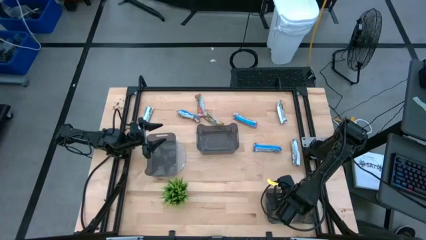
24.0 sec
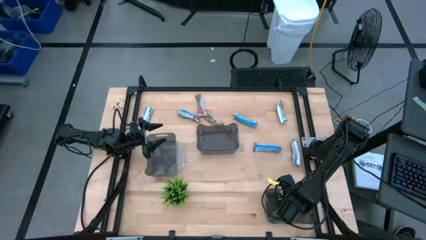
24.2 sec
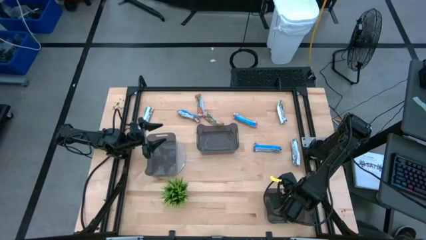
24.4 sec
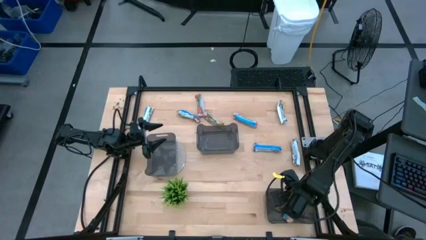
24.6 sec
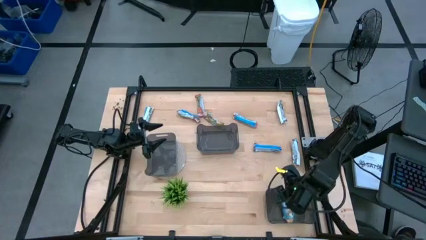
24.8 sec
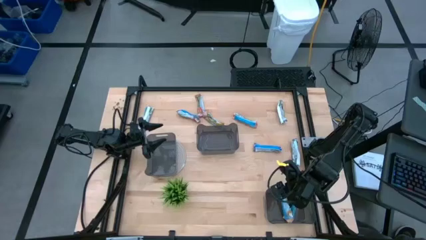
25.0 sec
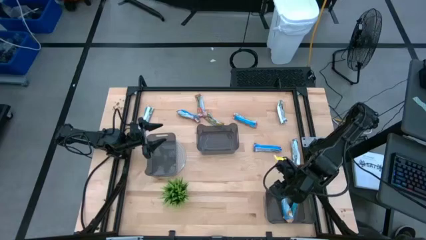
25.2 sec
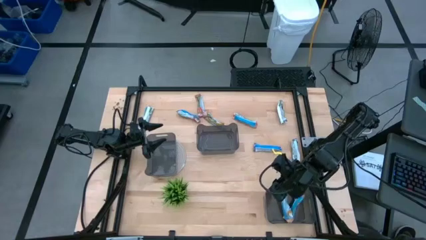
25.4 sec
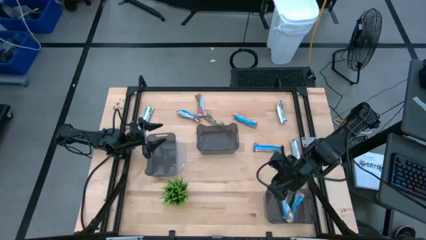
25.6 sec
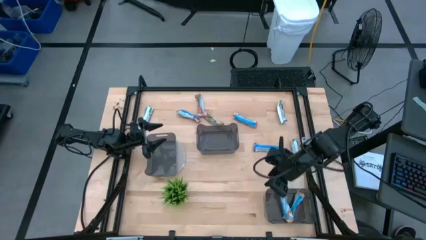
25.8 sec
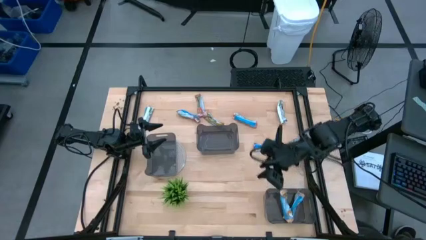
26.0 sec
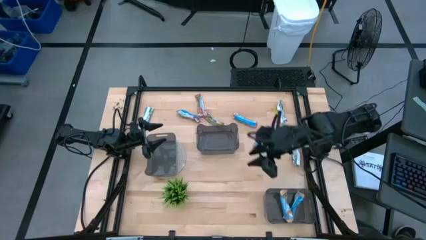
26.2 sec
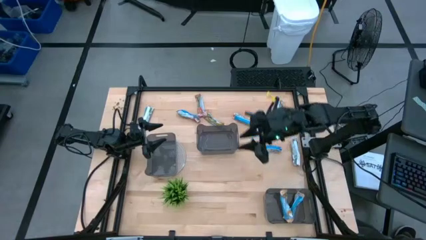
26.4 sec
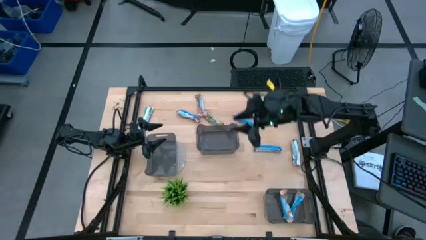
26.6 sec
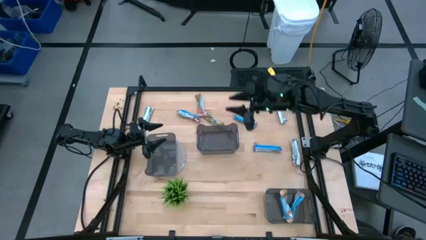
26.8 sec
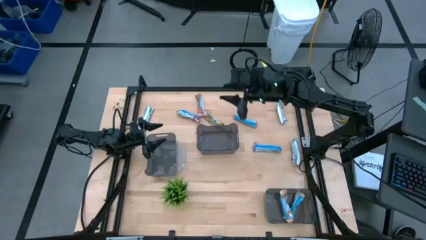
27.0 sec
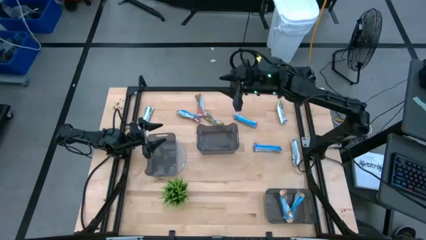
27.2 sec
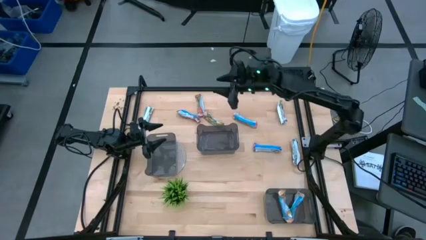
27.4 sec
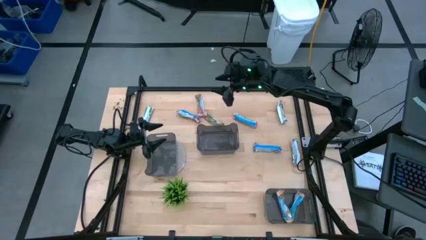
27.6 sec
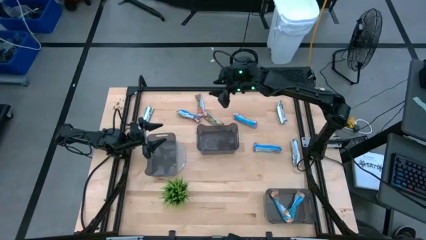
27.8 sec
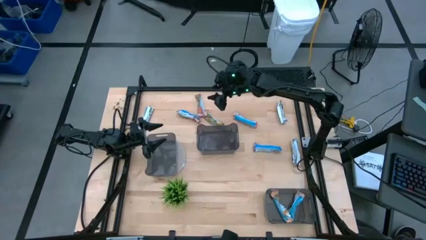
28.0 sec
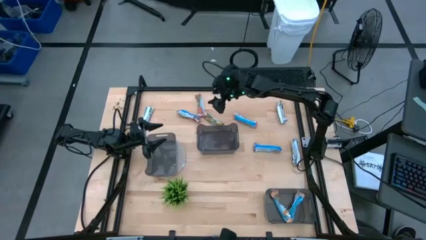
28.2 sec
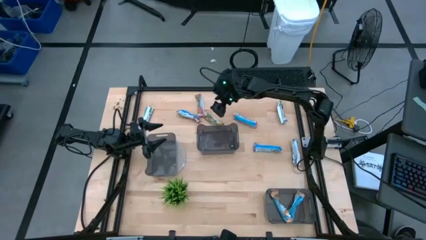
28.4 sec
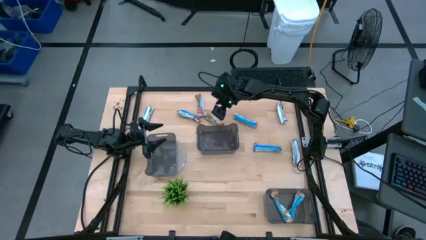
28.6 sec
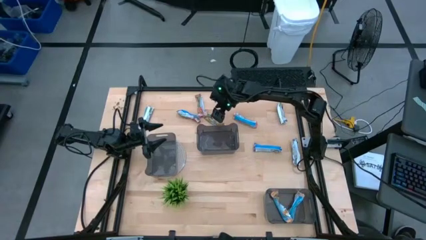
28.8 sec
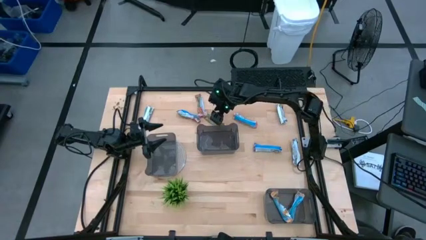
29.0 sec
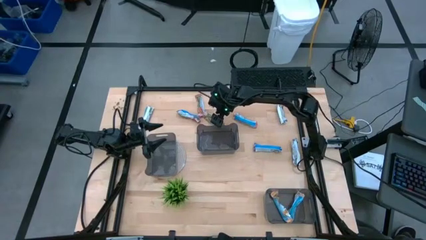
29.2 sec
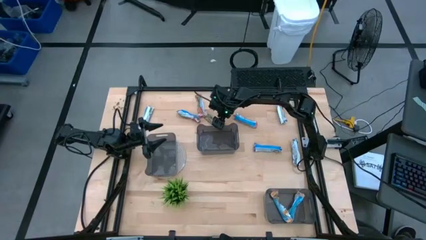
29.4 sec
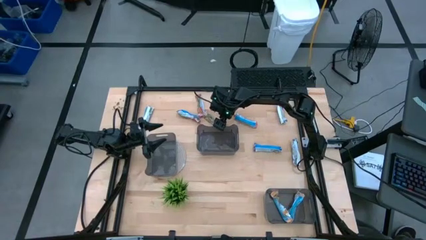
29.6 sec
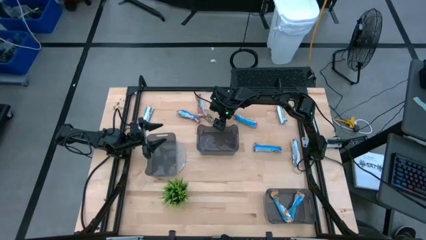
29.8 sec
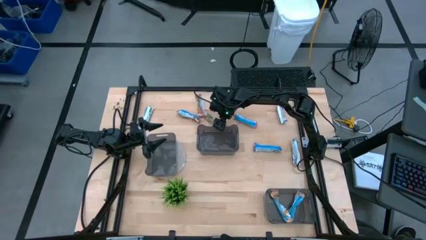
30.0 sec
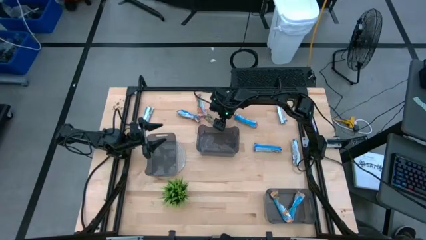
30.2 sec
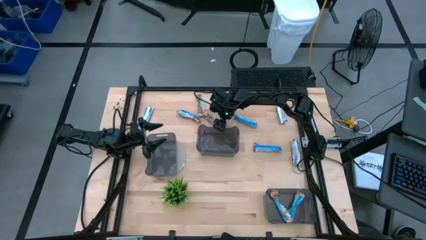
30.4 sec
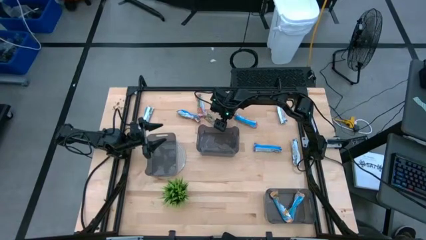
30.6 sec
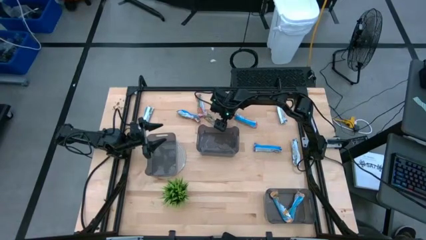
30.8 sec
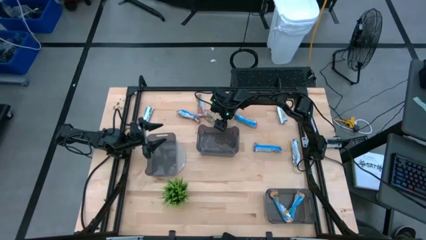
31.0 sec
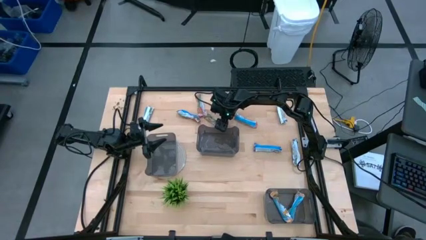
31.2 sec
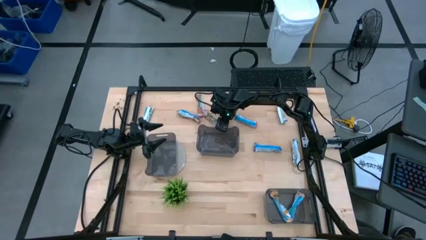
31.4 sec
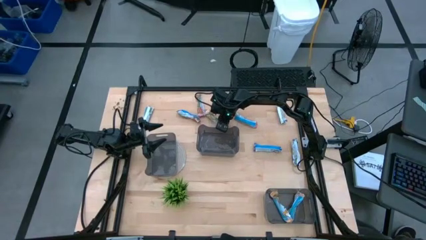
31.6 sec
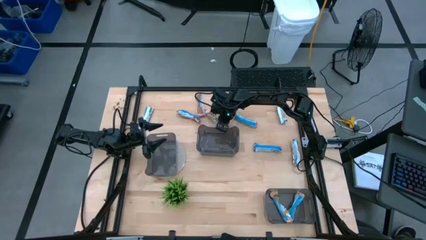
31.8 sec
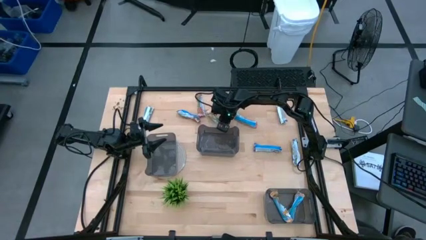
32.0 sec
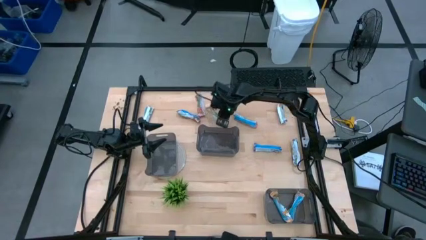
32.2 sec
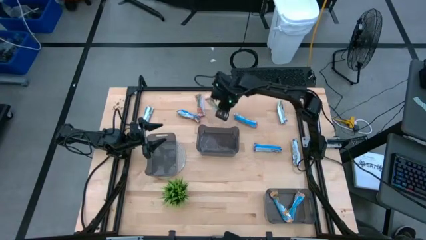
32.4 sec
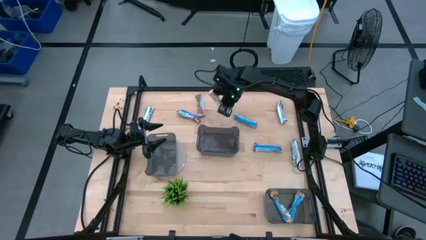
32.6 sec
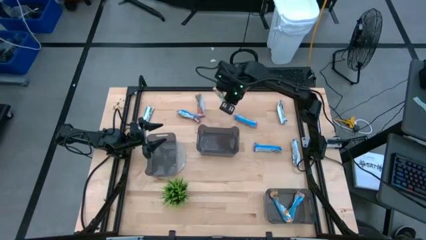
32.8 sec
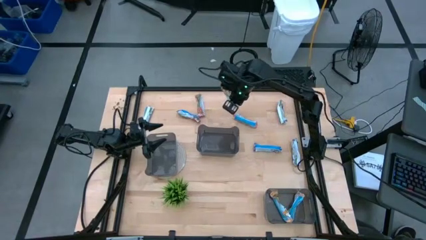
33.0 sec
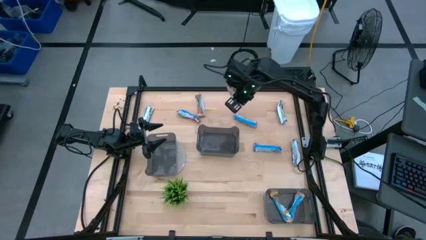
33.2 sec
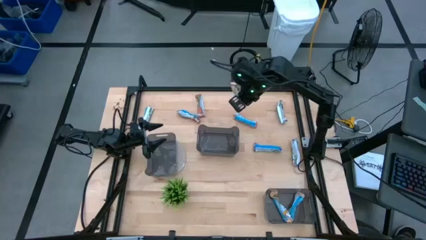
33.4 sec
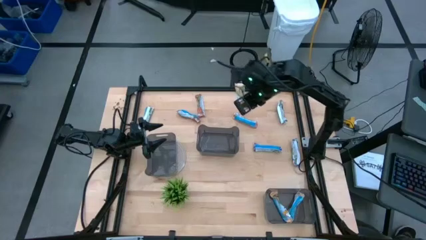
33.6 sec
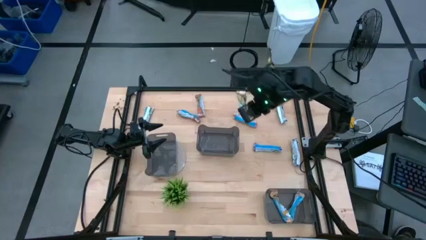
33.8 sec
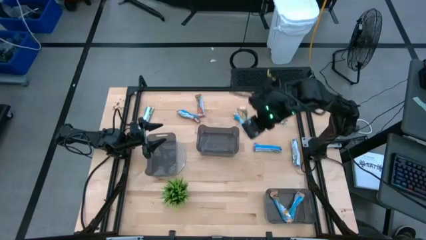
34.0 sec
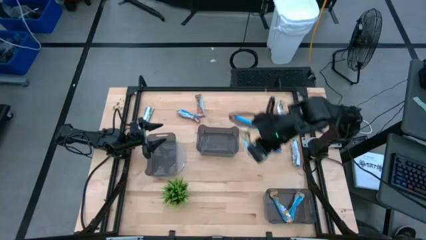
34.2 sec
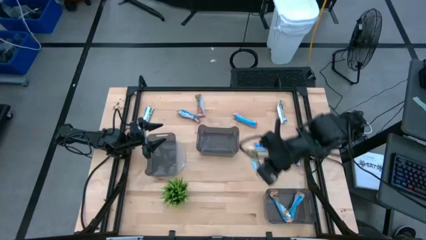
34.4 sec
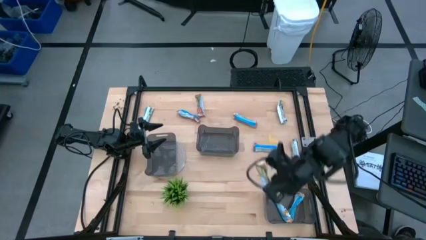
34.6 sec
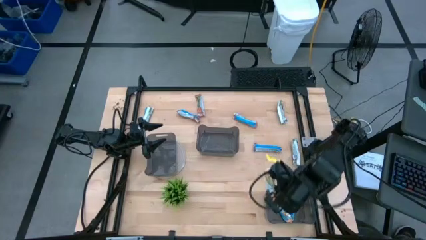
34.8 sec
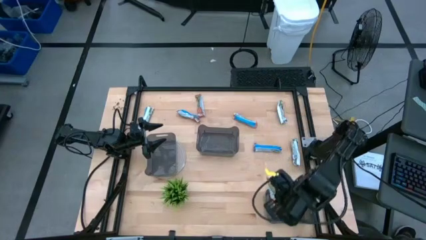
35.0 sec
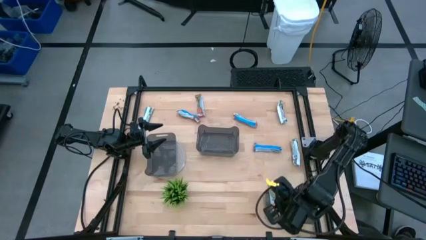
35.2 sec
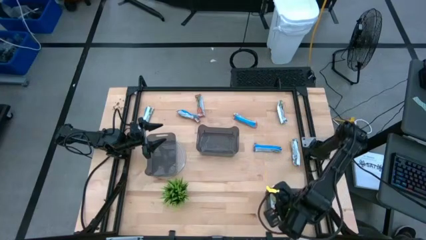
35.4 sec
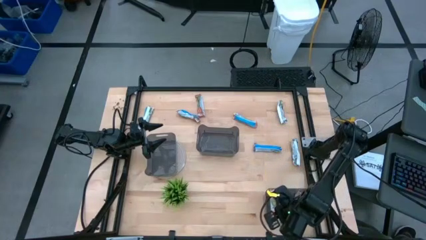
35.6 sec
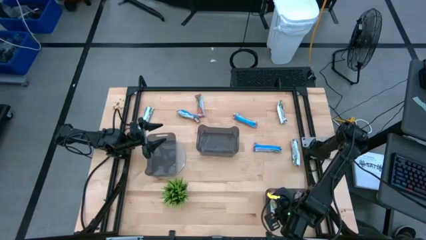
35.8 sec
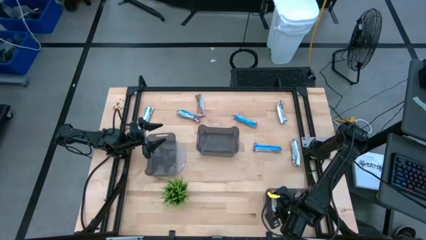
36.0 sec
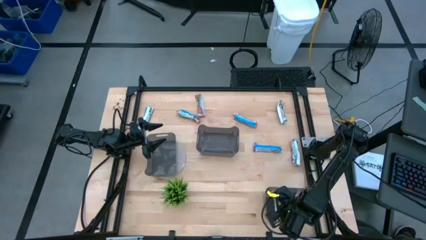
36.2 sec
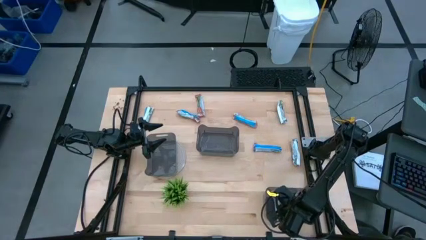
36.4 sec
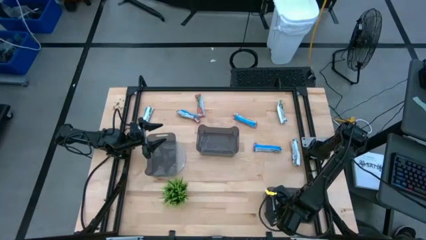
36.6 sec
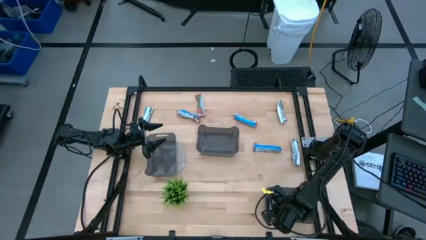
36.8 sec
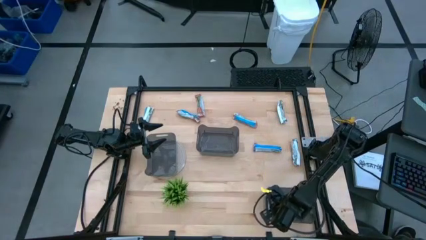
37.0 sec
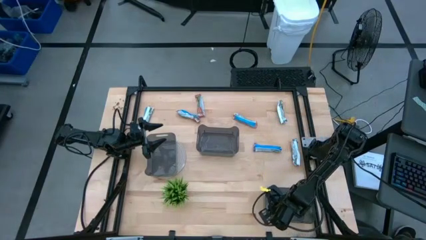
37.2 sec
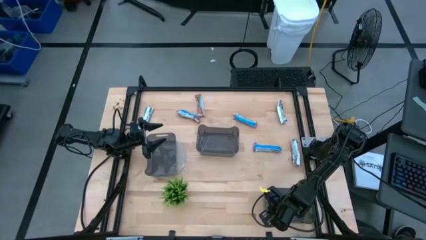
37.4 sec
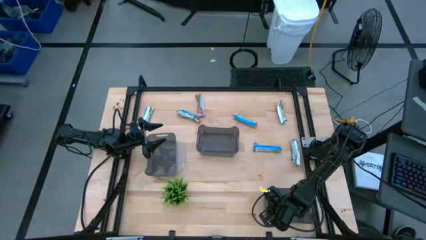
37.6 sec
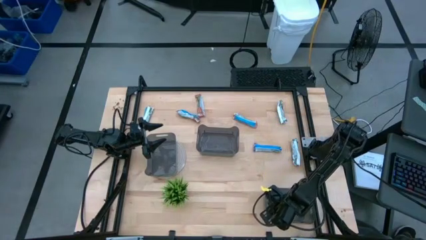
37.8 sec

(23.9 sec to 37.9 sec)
Task: Pick and place Granola Bars by type
Put the orange granola bar into the bottom black bin

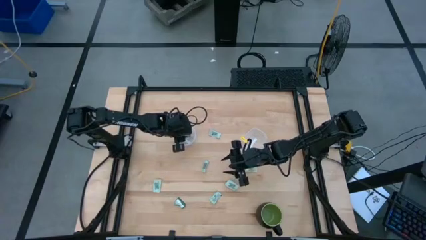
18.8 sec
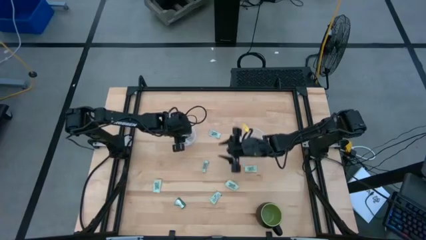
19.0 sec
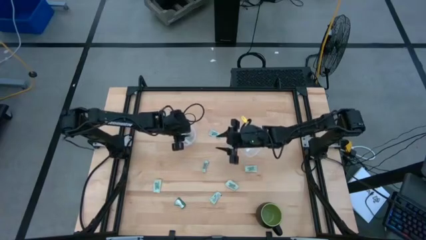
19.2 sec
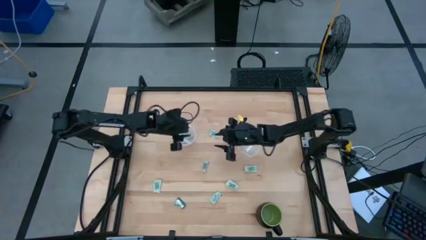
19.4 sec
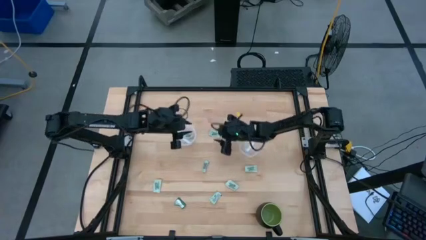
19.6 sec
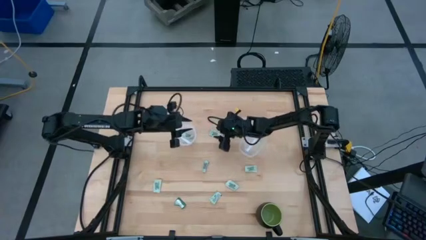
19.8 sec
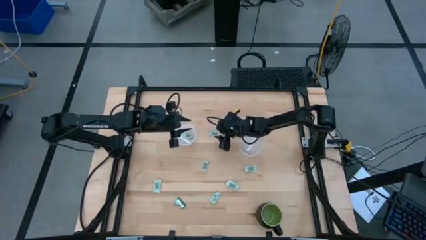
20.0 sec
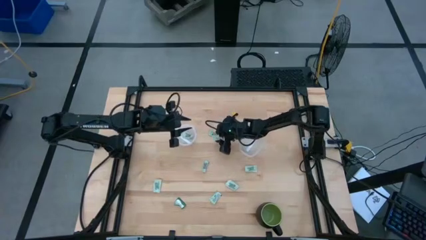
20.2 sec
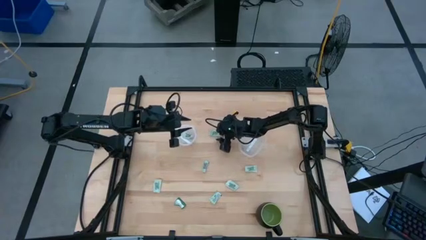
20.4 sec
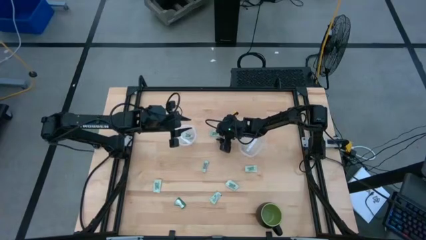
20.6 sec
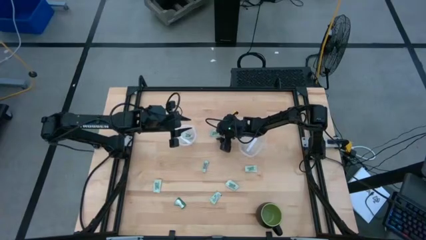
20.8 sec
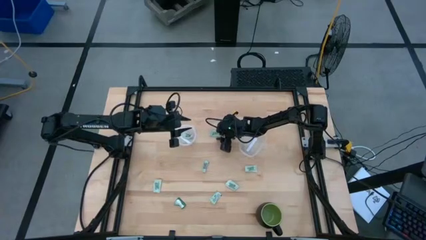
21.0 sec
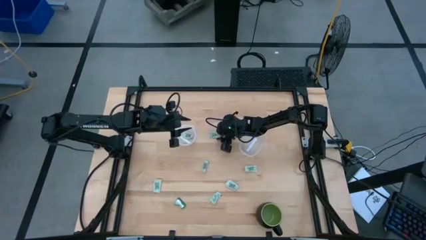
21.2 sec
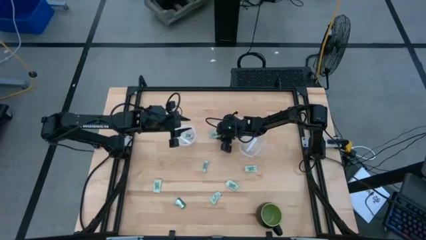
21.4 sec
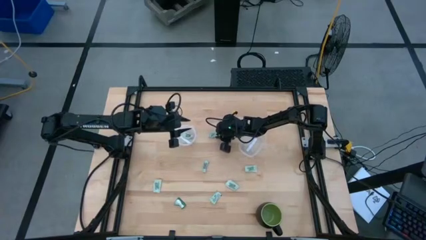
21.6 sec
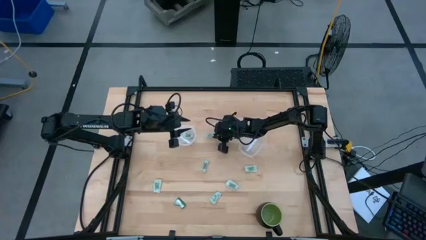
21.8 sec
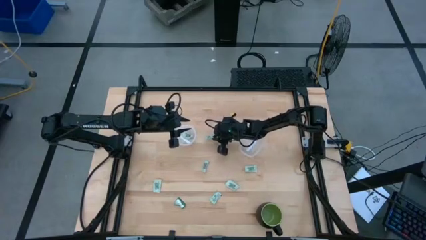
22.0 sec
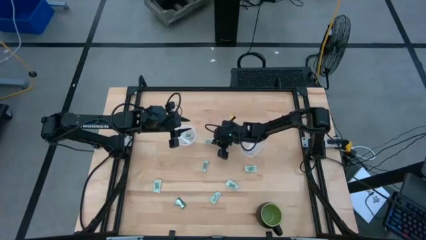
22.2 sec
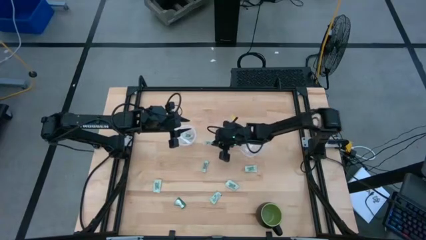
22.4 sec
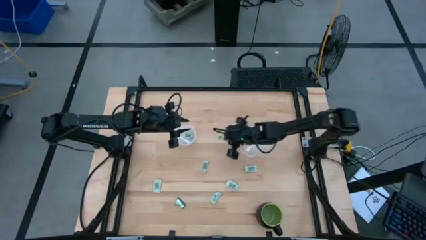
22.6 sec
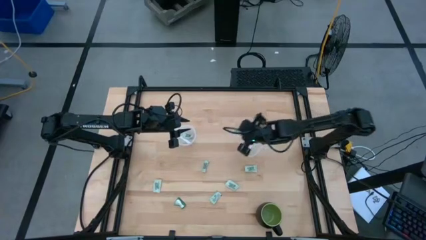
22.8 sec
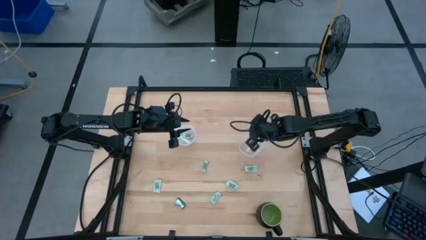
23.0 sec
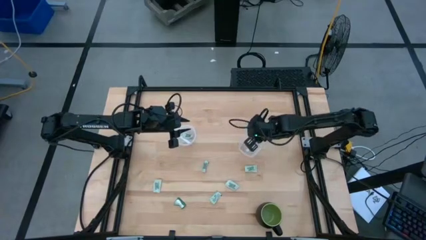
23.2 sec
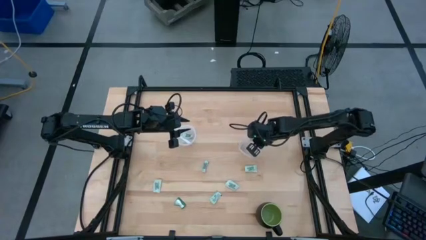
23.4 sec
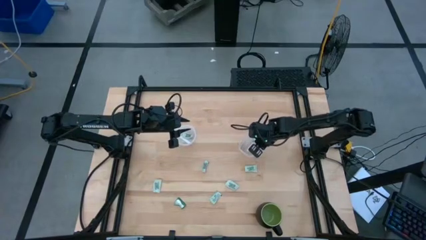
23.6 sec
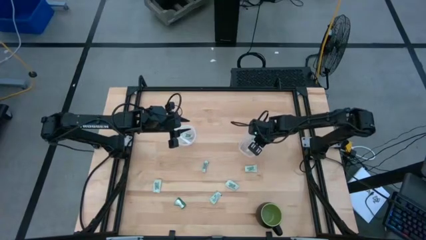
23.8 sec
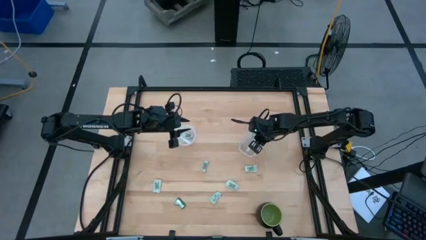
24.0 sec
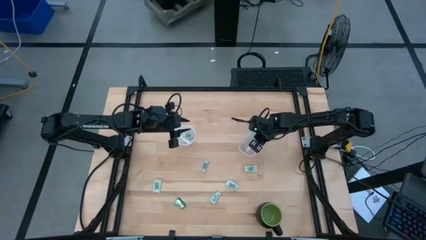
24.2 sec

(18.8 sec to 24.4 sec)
Task: Pick and place Stevia / Truvia into bins
Put the white stevia packet into the right transparent container
